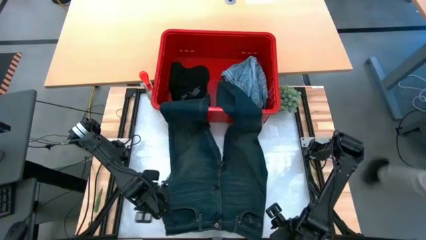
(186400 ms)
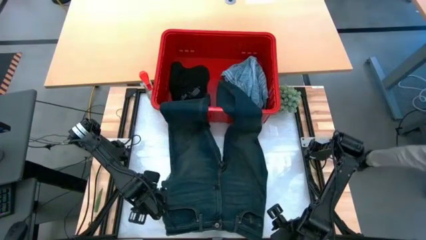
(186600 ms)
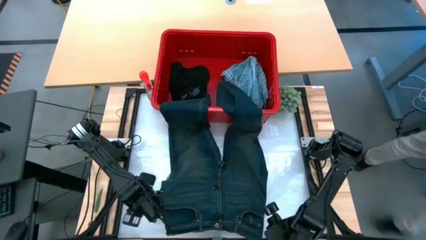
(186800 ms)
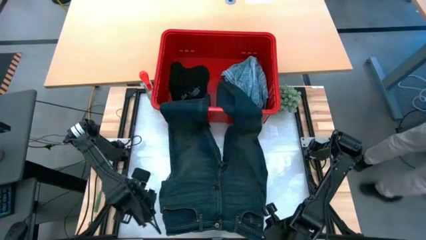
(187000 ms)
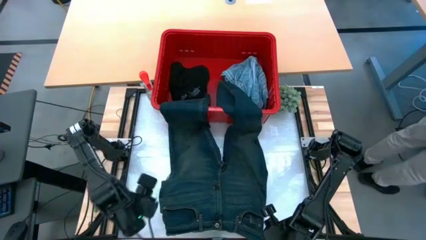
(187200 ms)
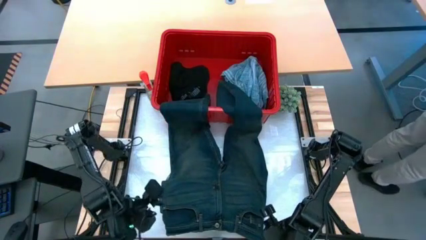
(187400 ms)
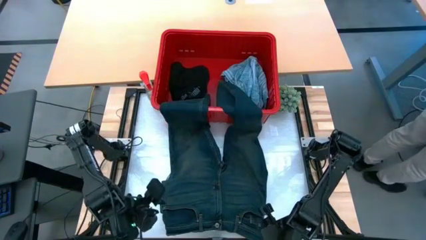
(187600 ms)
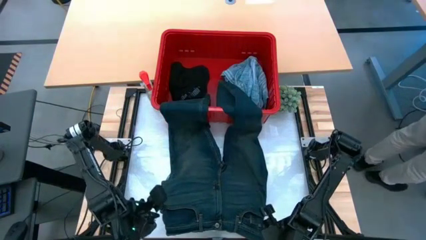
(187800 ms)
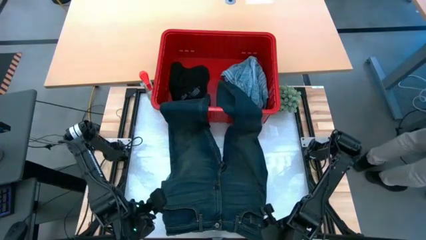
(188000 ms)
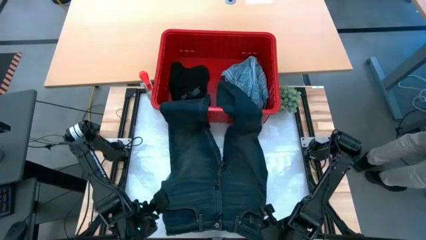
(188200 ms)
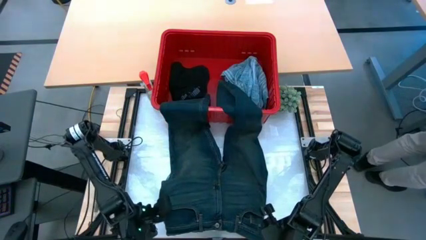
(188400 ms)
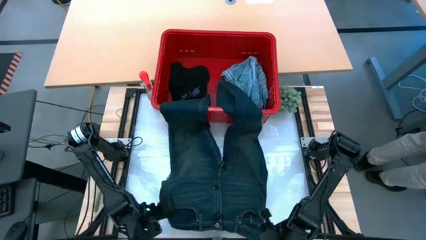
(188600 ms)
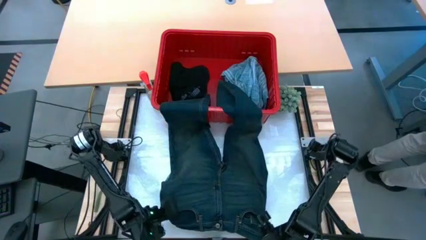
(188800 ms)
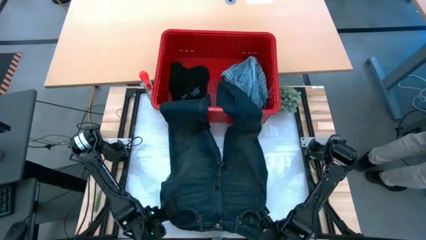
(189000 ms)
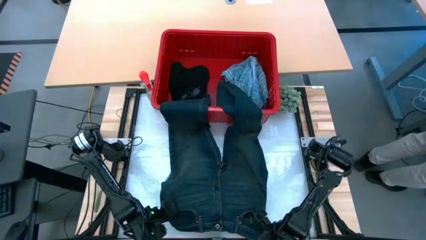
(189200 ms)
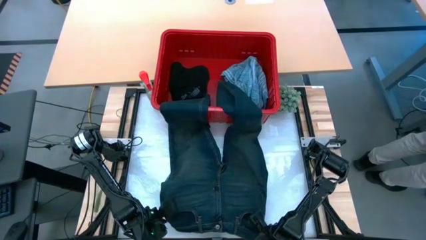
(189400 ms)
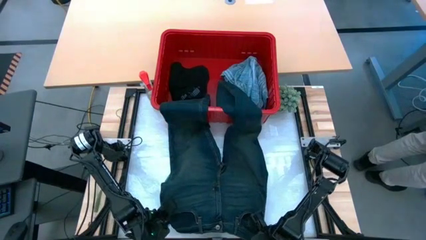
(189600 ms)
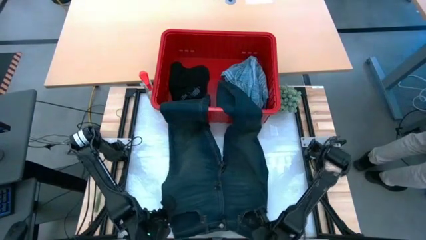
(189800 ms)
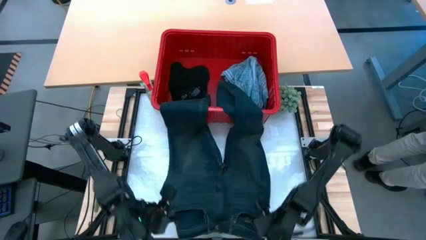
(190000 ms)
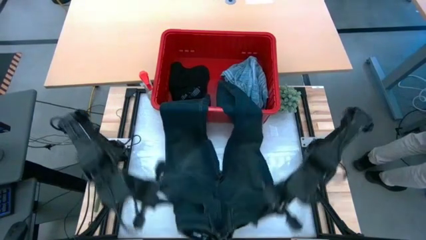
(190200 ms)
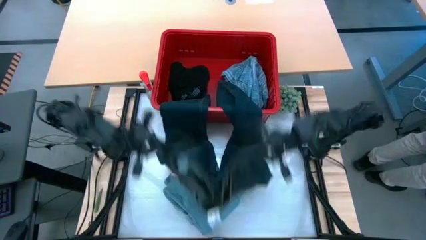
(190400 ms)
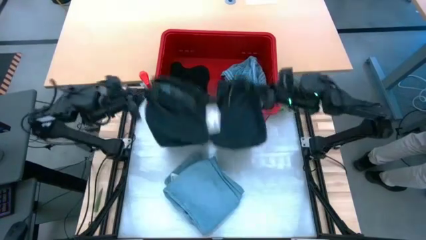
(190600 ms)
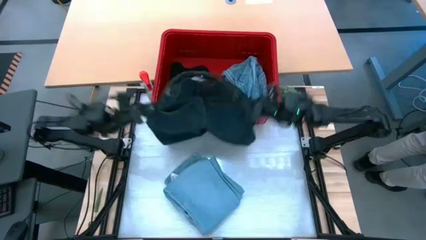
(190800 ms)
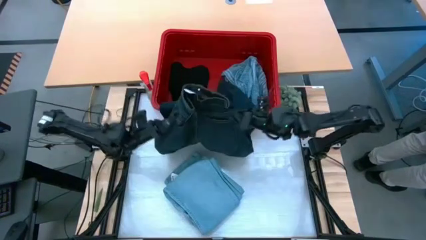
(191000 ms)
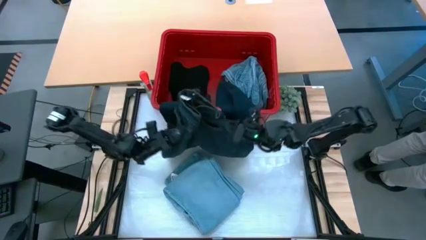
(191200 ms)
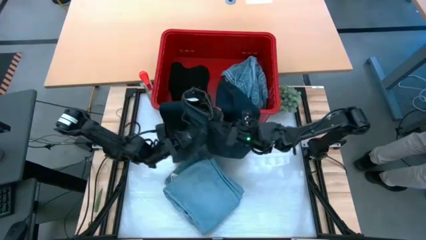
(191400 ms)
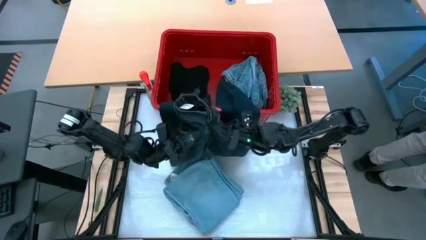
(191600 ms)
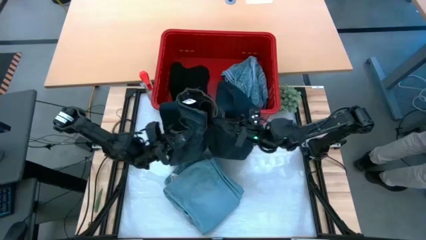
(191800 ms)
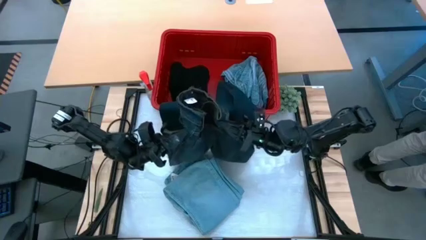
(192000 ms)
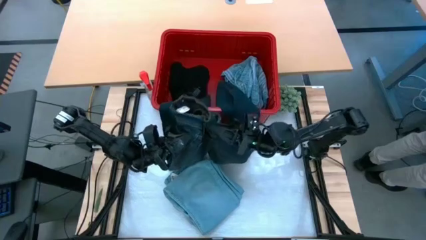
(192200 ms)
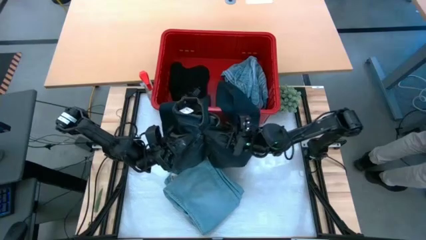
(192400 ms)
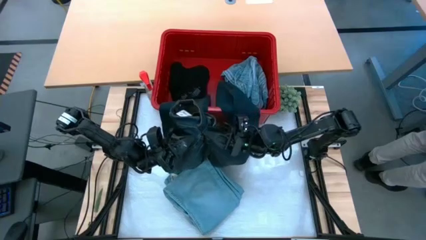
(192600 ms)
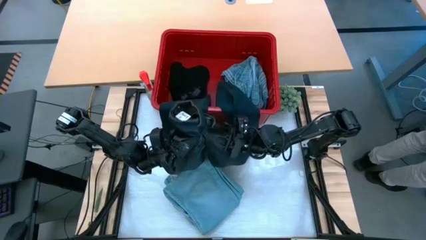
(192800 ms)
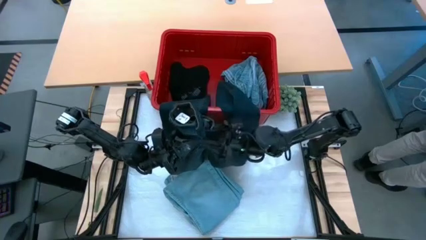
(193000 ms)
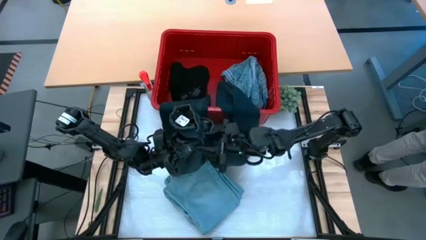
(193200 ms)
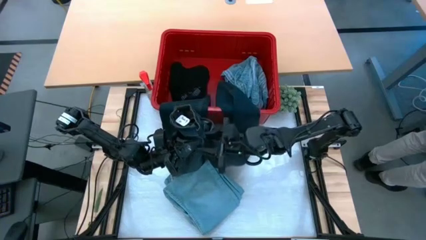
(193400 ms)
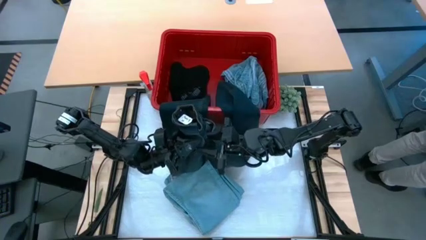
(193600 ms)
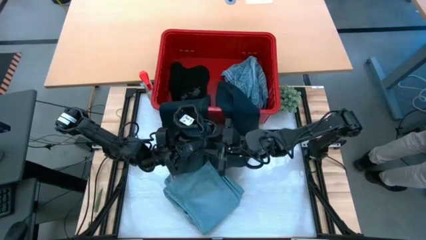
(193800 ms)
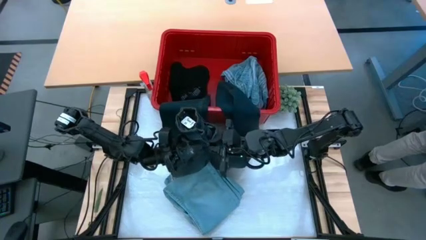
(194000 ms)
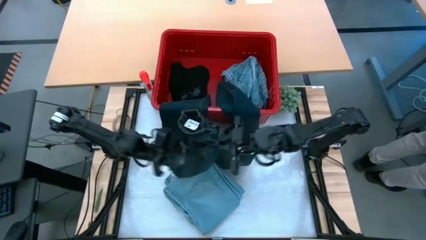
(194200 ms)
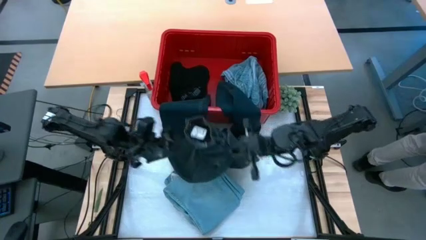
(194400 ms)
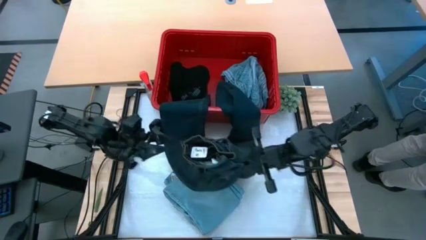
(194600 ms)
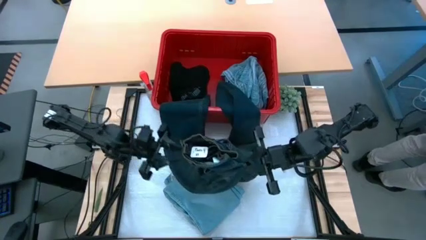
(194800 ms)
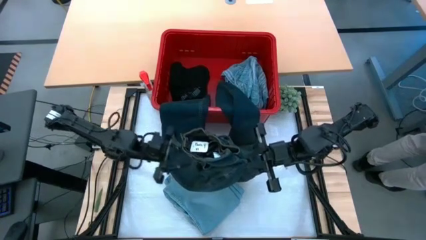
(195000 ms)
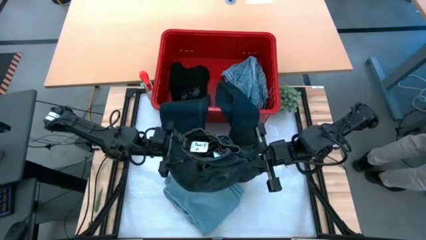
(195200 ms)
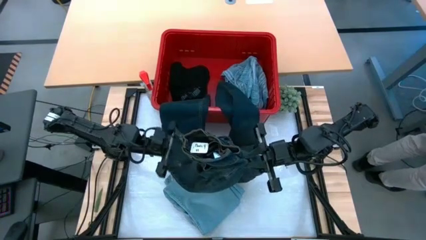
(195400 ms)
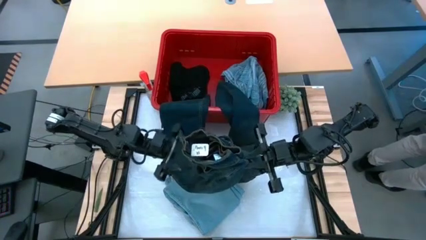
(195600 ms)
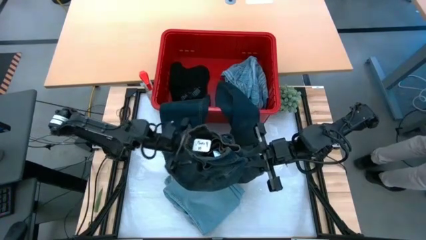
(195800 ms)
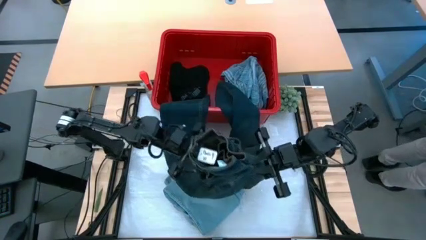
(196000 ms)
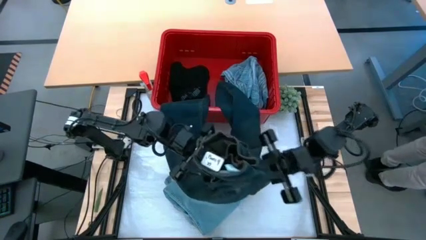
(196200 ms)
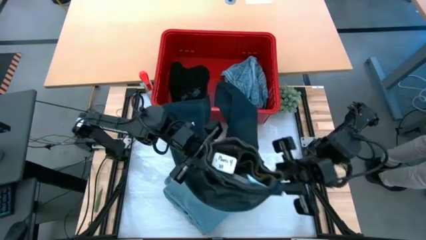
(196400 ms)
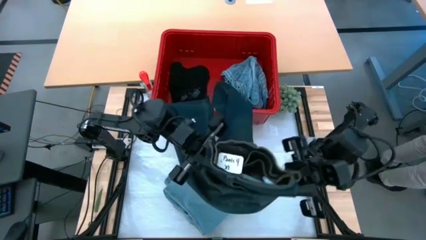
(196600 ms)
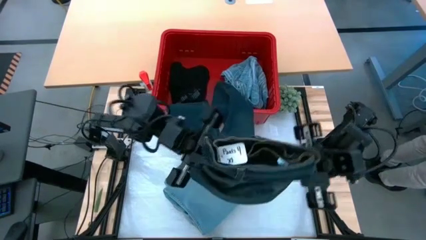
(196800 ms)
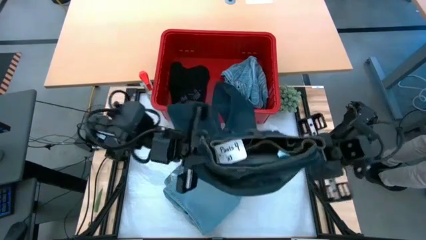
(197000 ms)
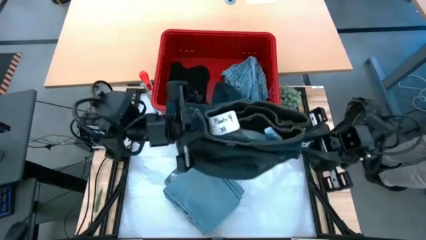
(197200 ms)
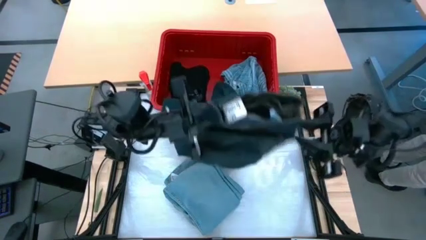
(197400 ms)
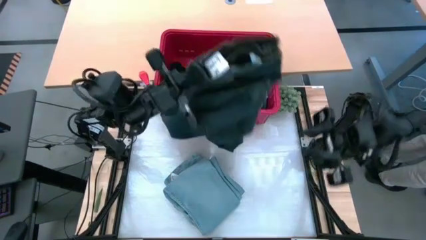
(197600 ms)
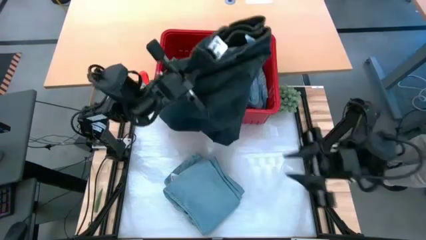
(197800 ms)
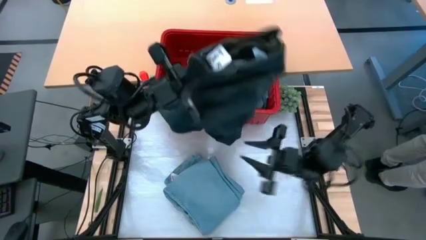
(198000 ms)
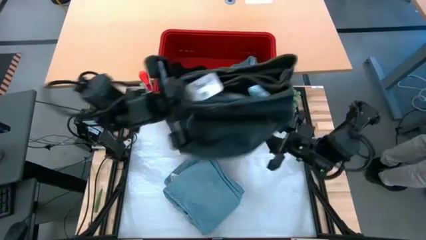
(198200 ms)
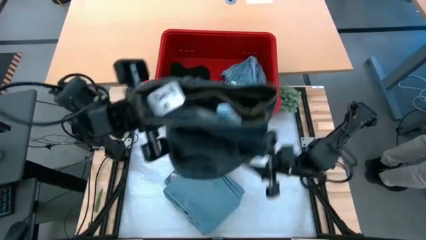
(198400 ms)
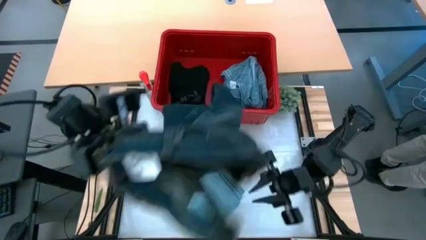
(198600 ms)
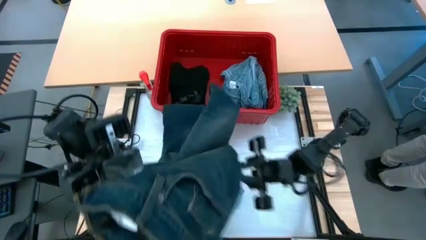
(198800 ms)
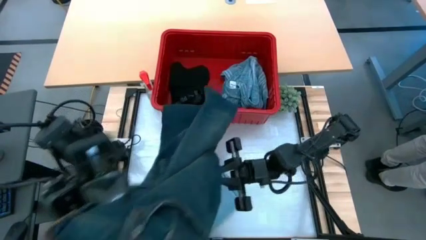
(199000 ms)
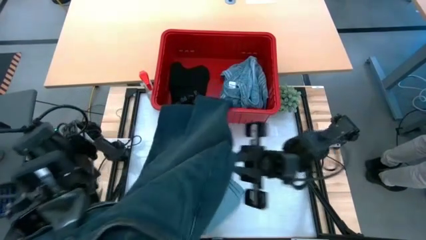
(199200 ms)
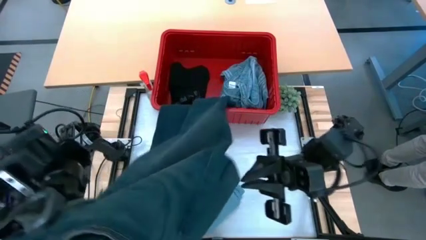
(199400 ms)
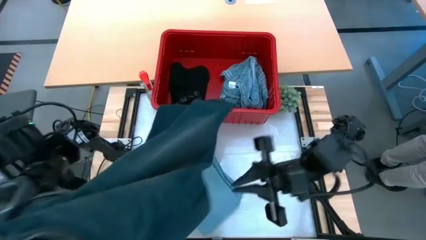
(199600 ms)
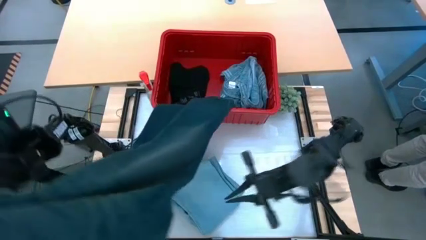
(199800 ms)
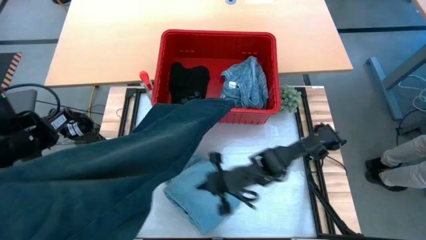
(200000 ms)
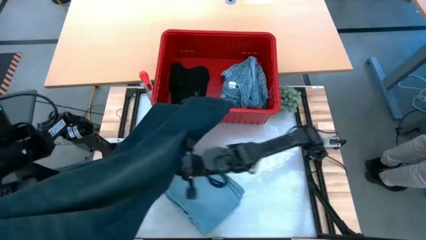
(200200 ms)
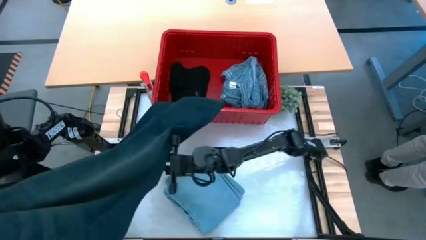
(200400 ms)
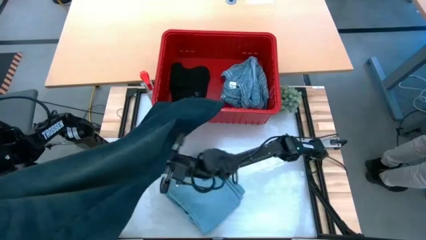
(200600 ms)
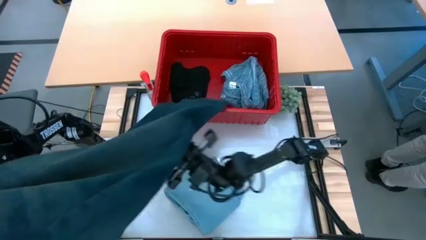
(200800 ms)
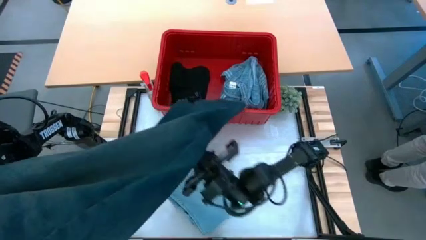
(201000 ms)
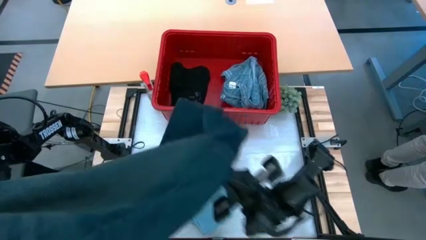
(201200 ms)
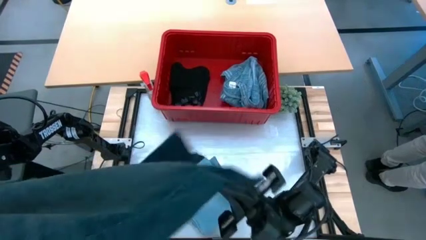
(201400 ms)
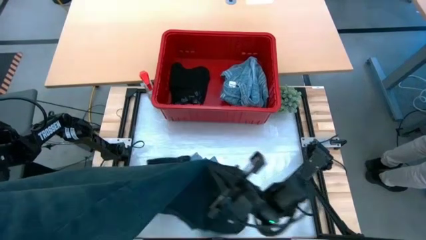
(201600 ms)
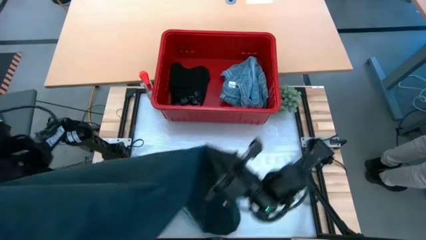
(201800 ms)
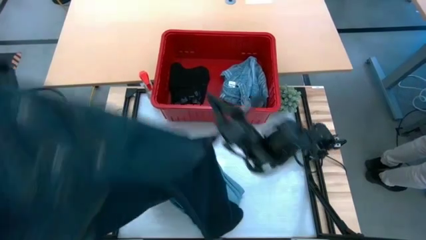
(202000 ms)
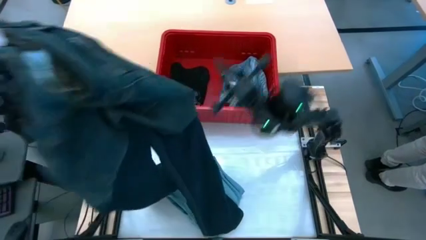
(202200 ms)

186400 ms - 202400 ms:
Task: Fold Laundry from Bin
Fold the dark blue pants

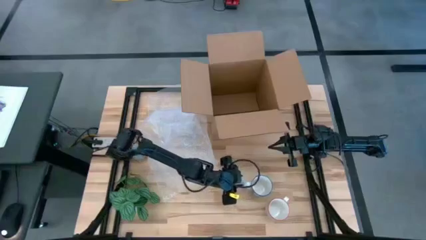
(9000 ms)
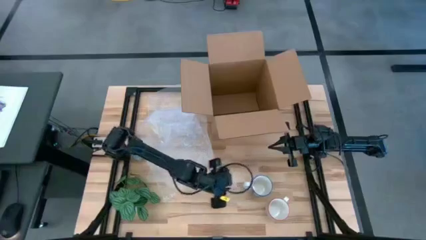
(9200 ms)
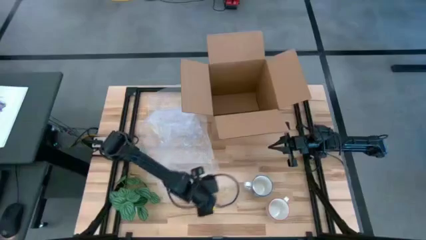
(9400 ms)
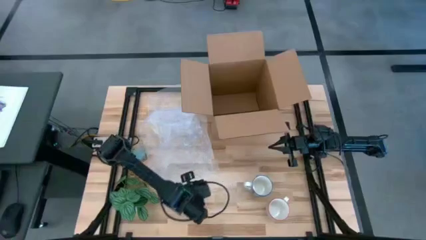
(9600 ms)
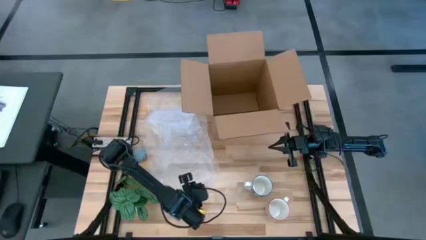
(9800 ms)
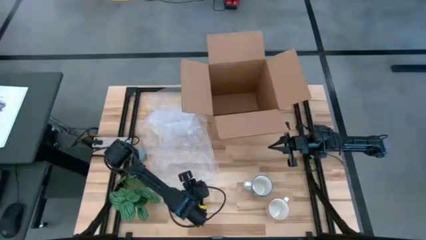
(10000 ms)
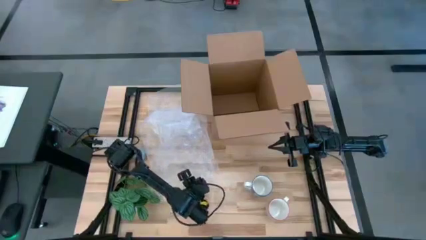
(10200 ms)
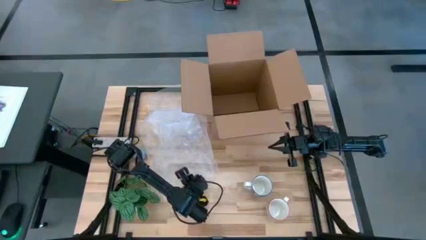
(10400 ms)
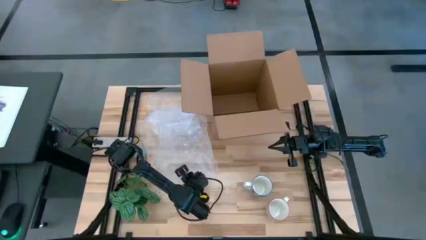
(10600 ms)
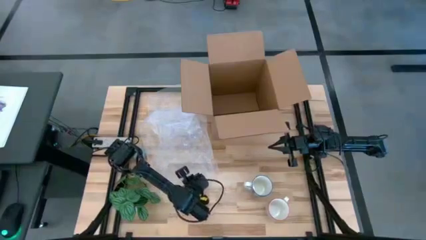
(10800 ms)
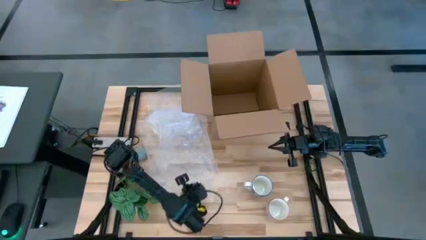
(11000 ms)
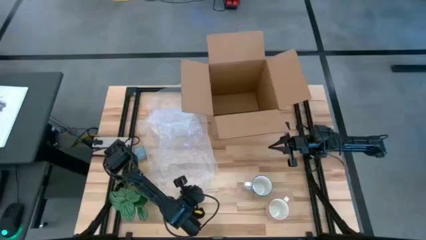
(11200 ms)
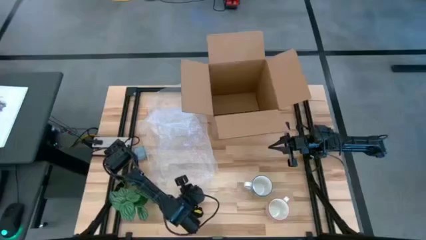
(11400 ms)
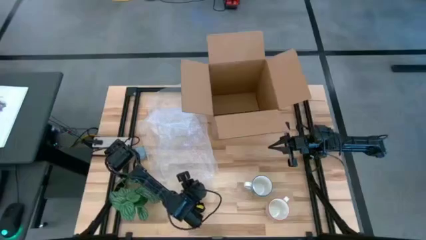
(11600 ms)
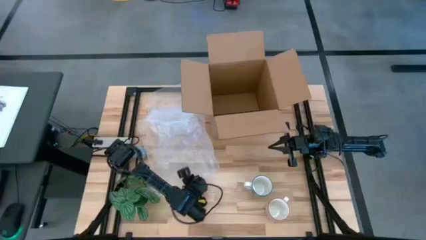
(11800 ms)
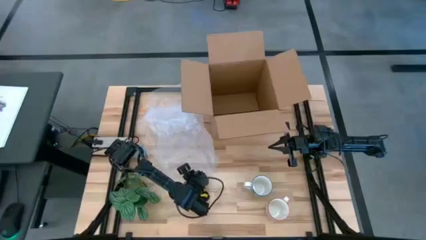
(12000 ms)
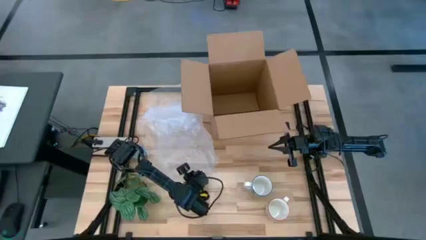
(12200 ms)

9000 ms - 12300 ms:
Task: wrap mug
Wrap the white blue mug with bubble wrap
